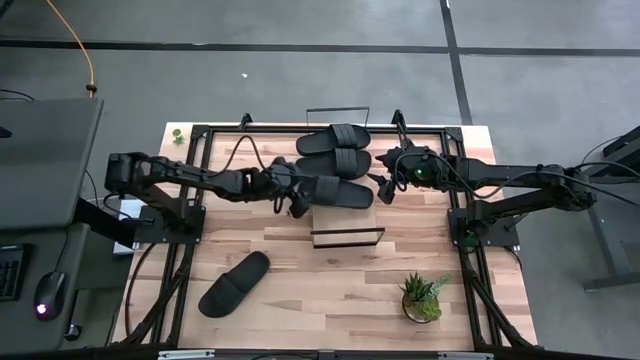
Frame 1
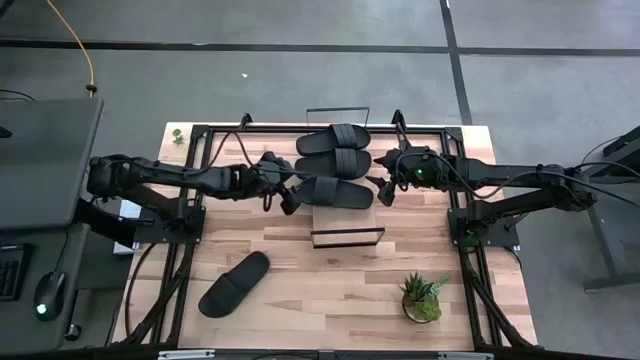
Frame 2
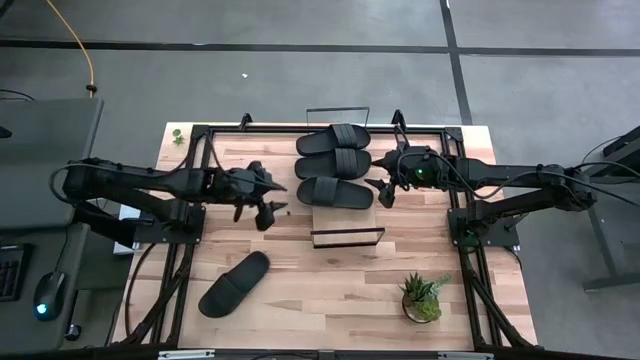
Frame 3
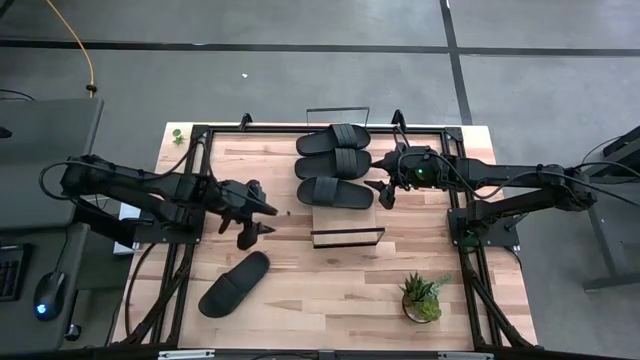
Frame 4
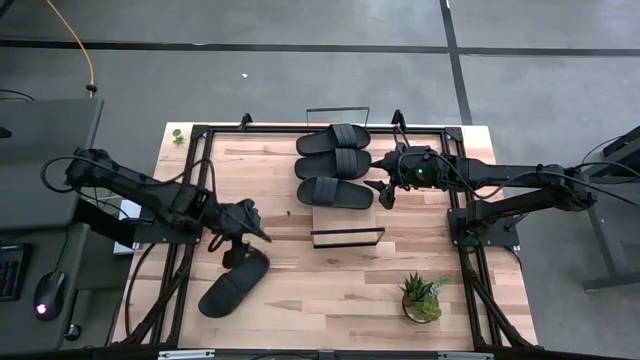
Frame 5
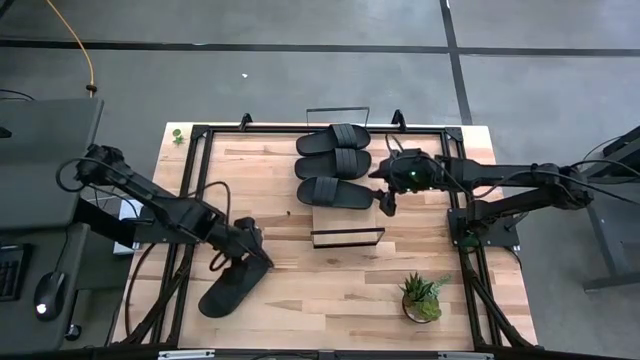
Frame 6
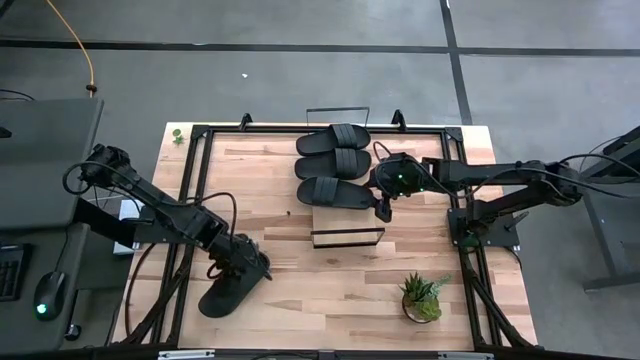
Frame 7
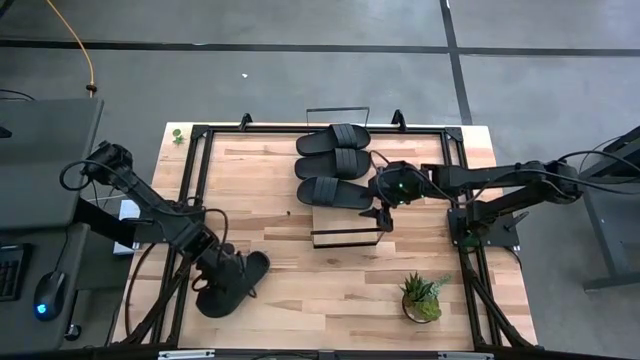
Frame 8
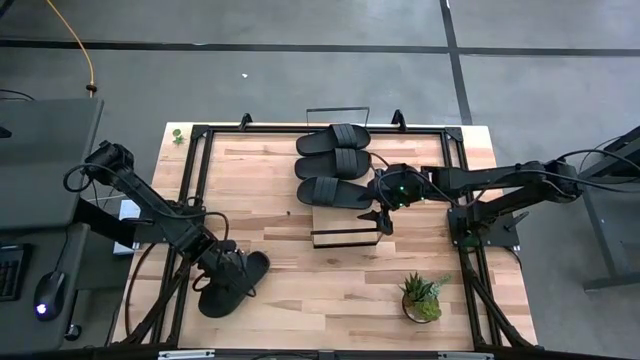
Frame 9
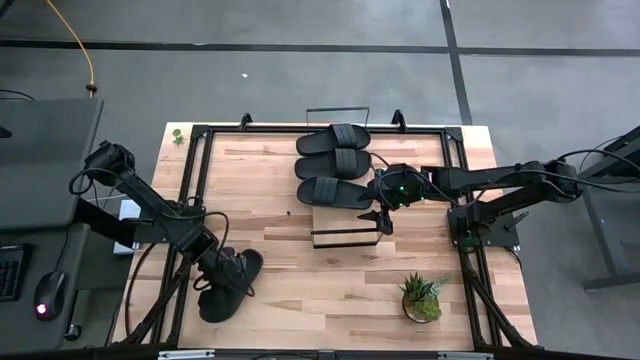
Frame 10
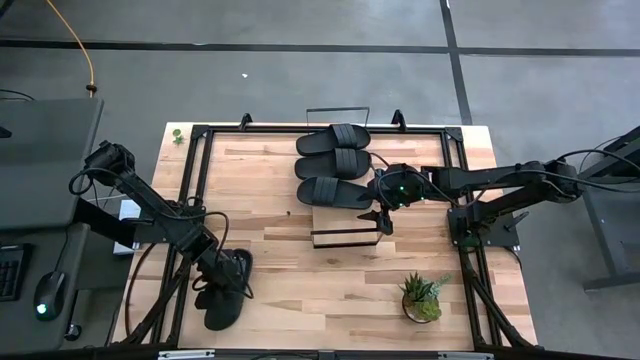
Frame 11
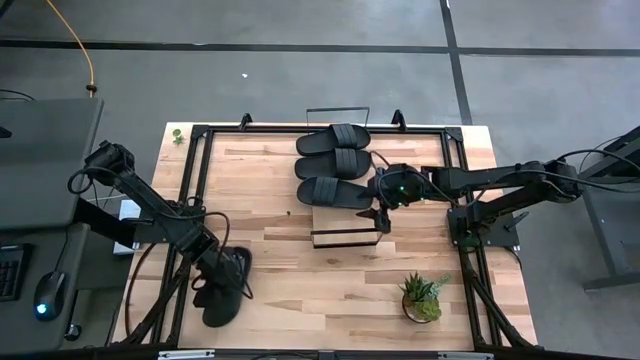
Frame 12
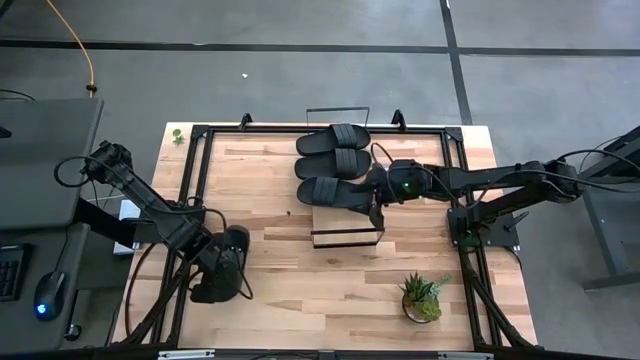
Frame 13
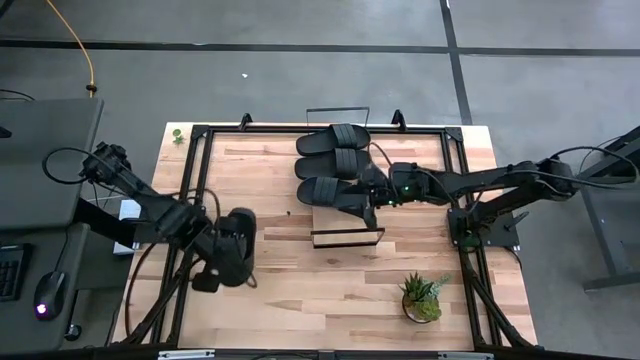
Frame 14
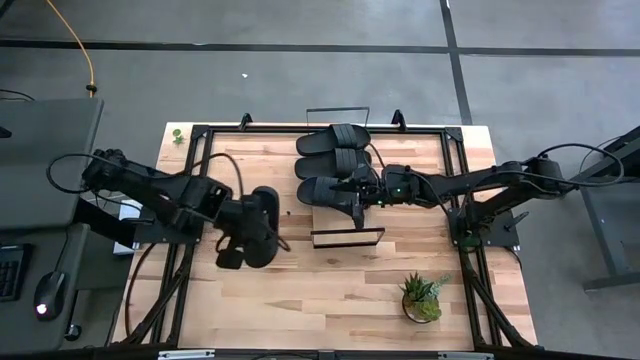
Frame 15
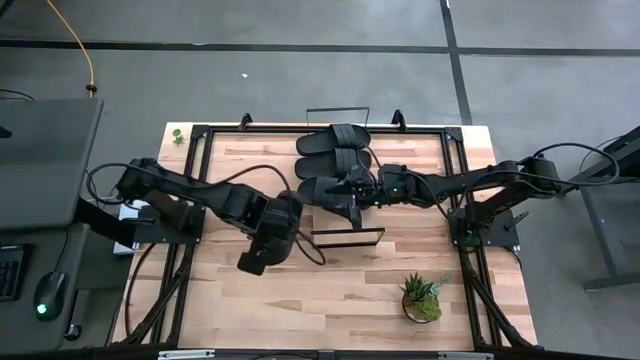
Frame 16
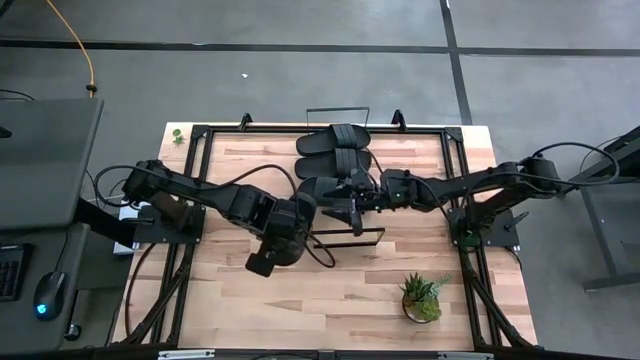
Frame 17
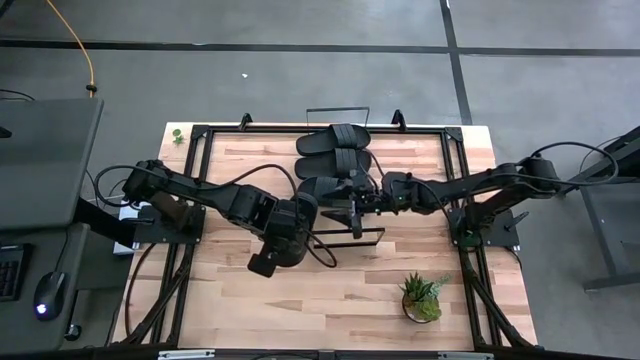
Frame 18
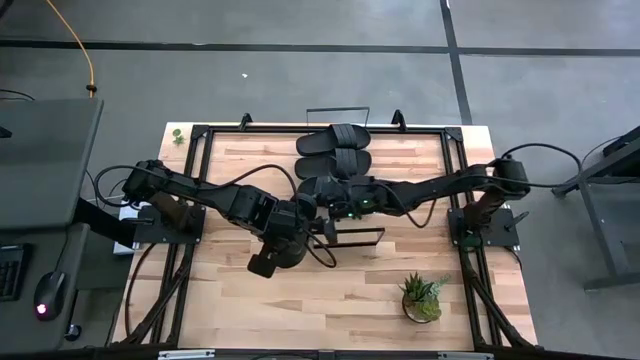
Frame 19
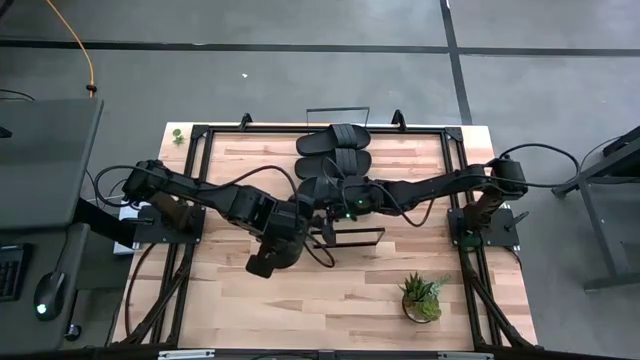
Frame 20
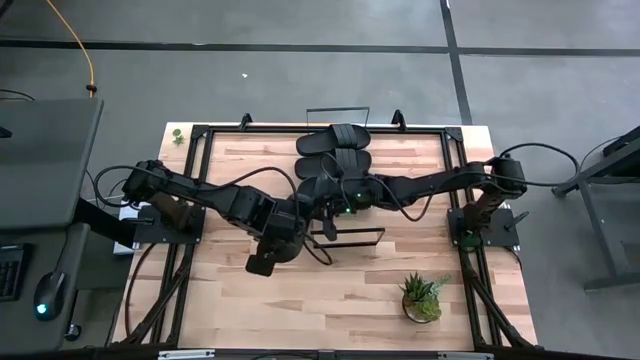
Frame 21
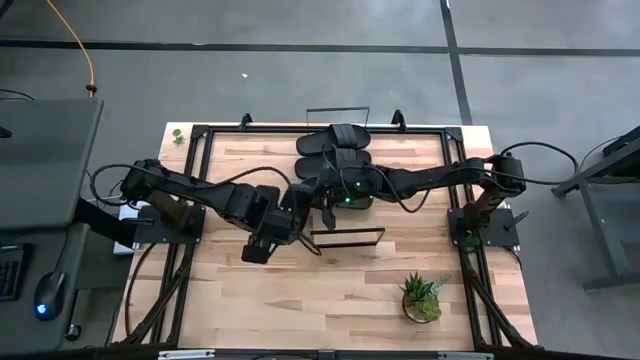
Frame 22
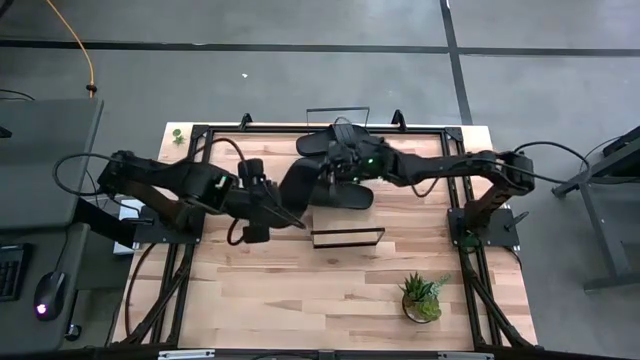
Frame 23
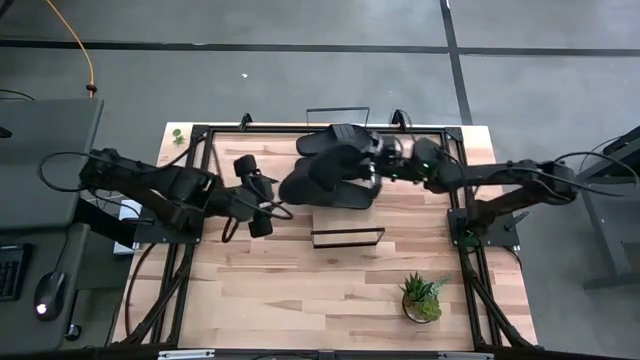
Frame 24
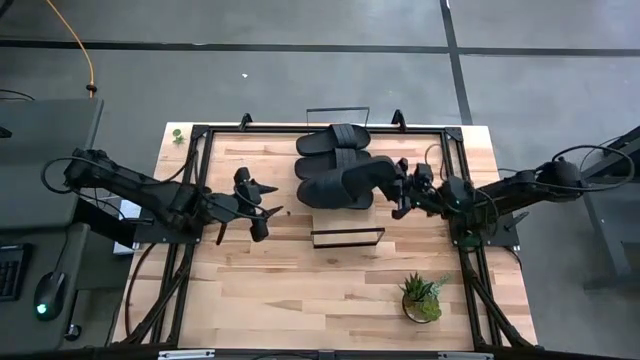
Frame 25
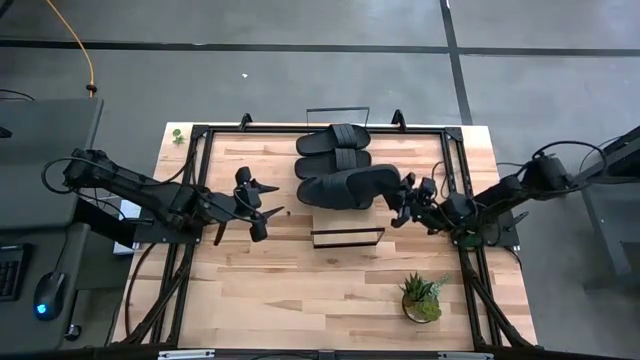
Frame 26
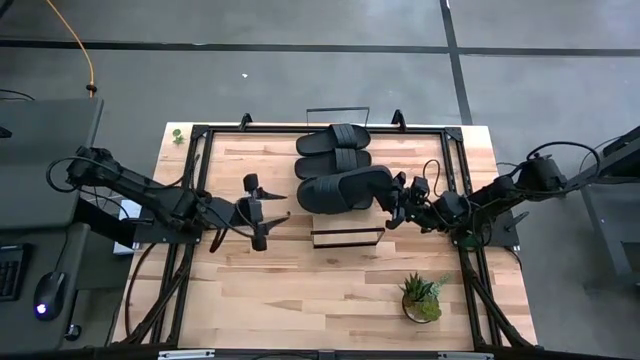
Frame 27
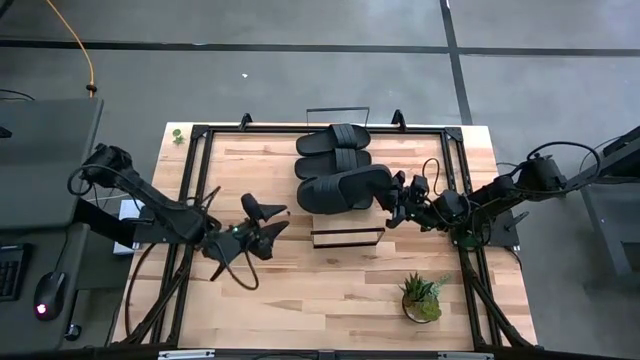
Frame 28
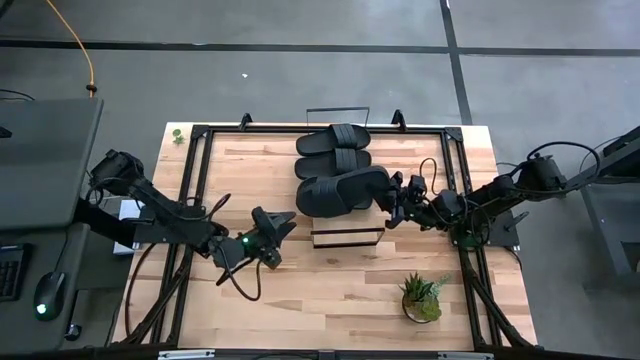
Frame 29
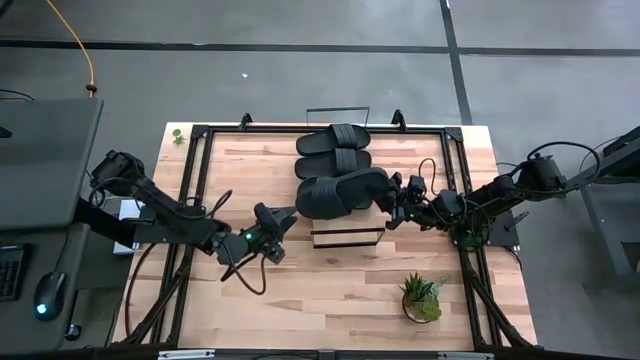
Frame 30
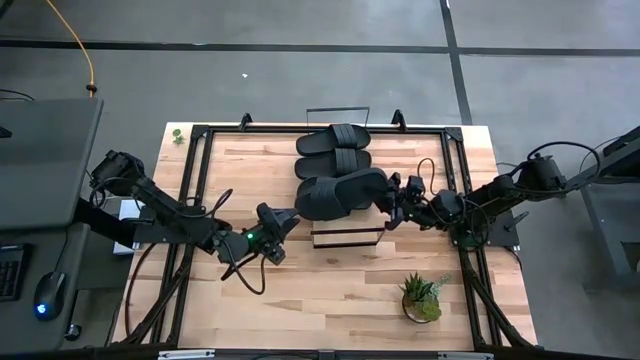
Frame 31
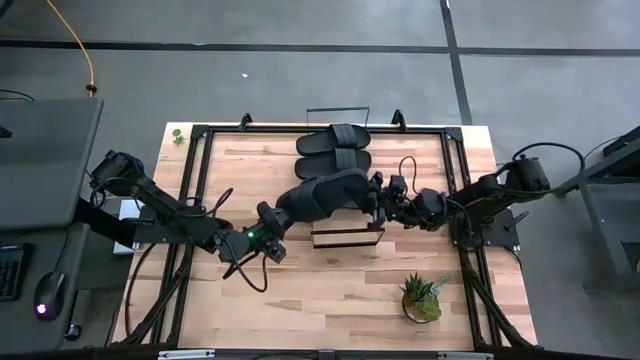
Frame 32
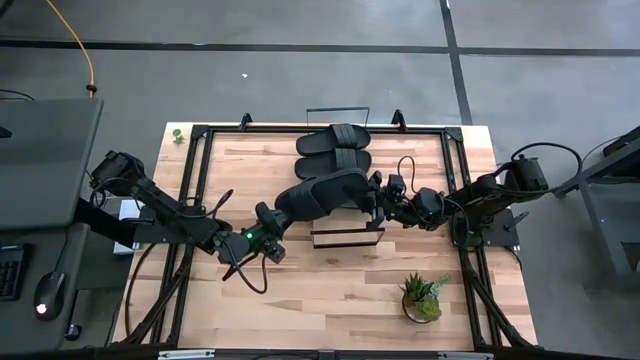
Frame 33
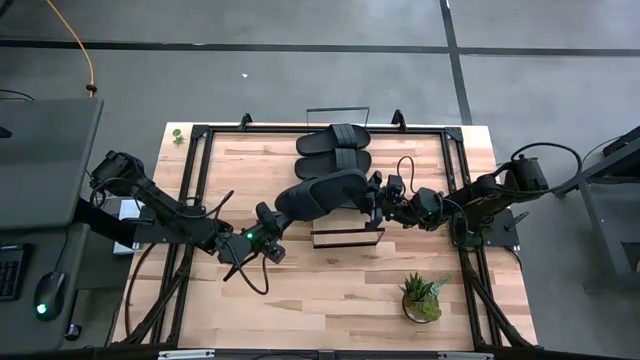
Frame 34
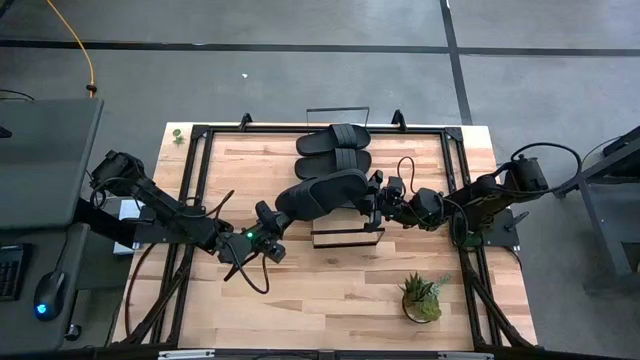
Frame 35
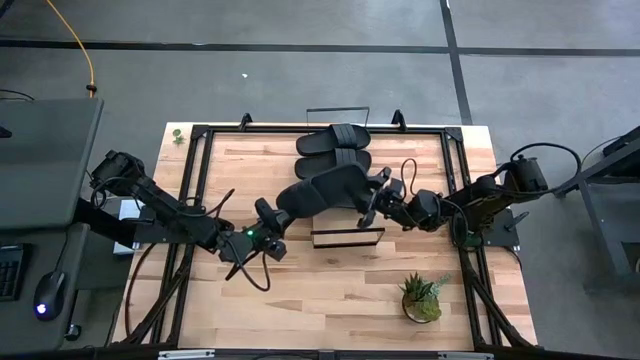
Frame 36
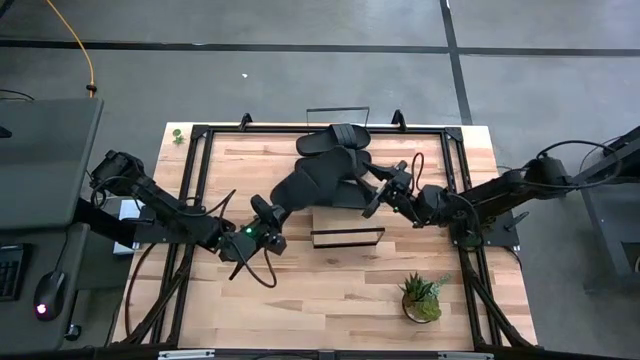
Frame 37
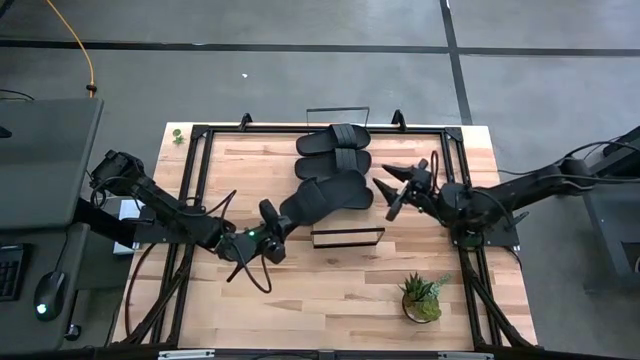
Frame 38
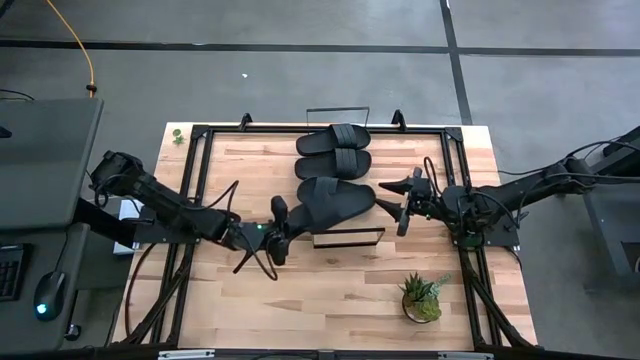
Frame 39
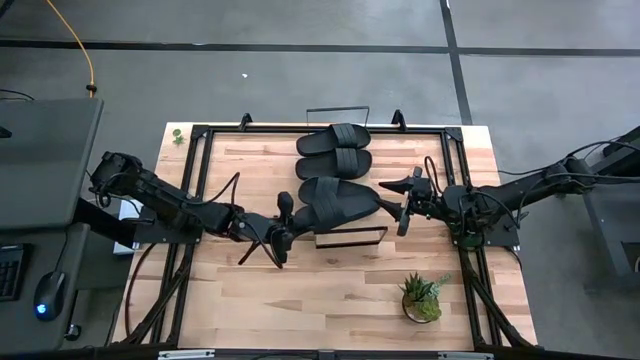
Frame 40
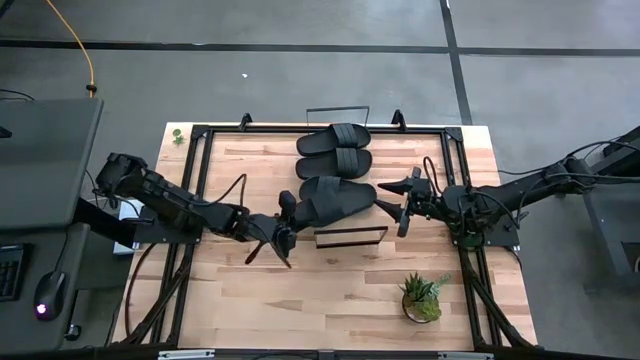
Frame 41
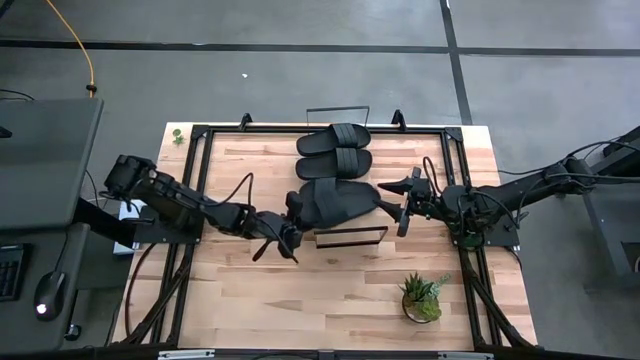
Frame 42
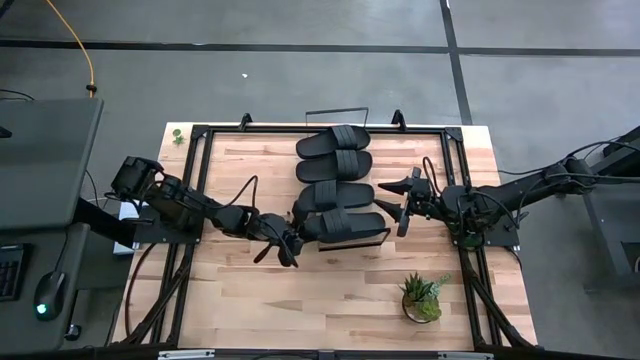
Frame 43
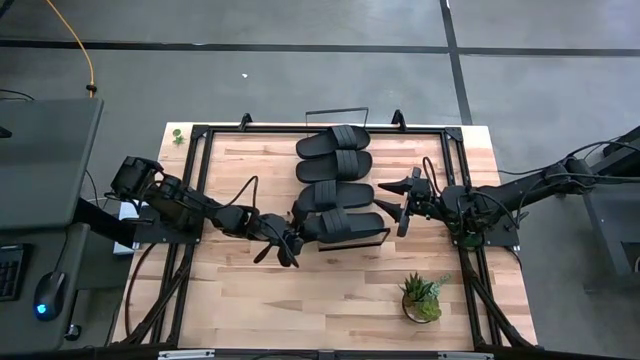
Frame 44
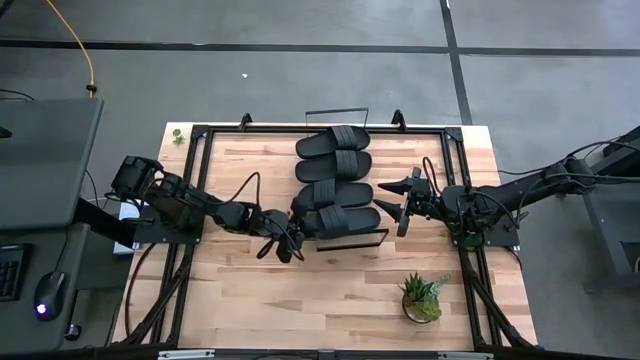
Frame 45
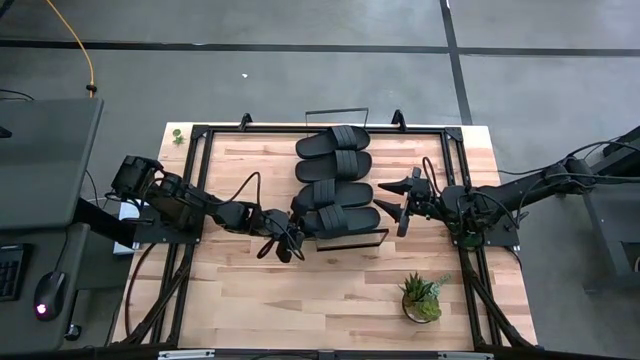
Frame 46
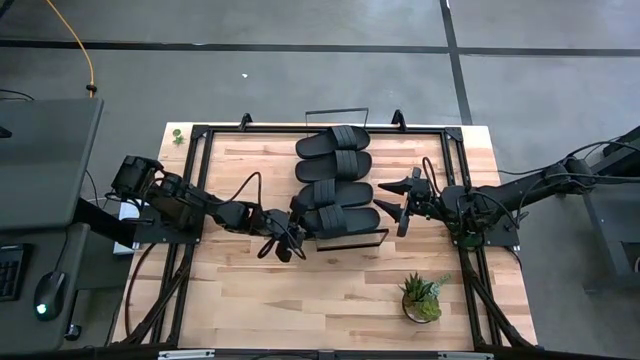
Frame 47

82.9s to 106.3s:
Task: Pick and place slides into the shelf
Put the black slide on the shelf
